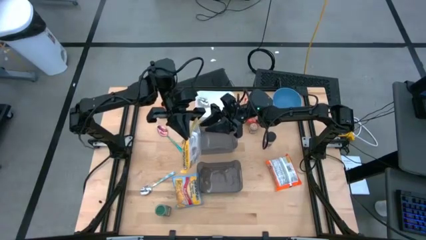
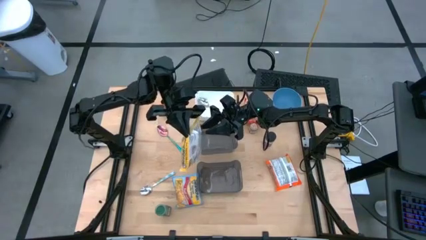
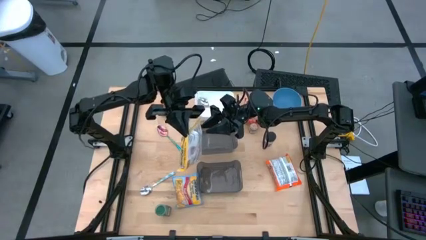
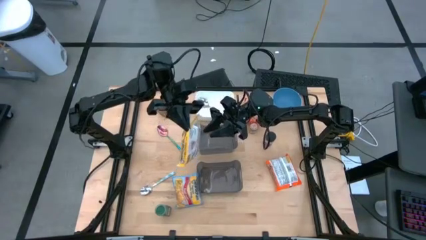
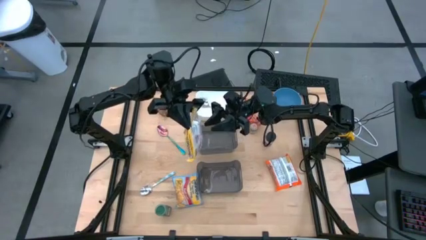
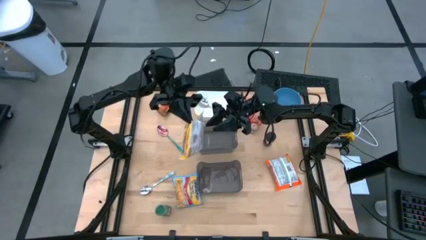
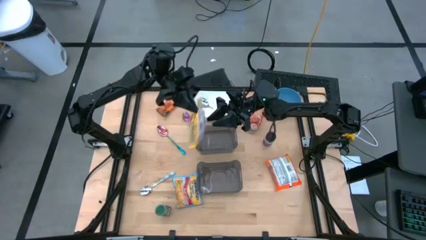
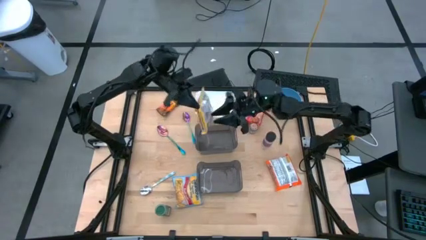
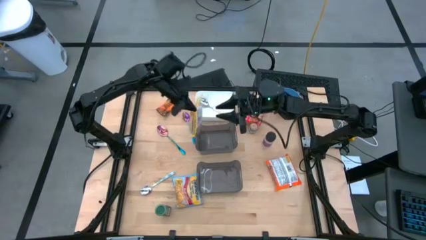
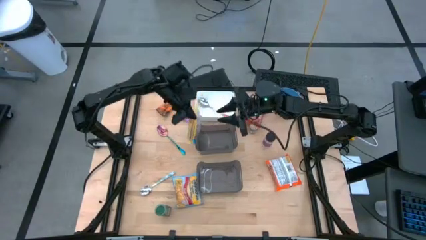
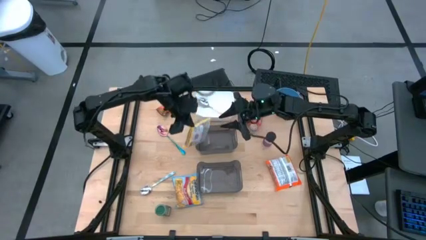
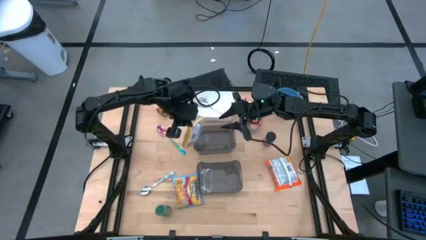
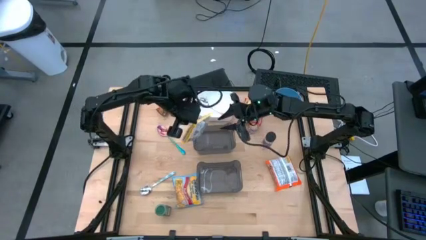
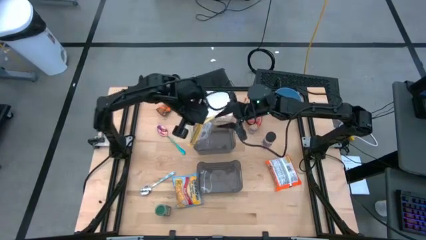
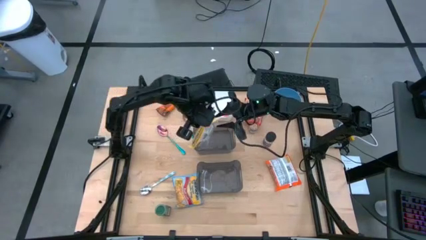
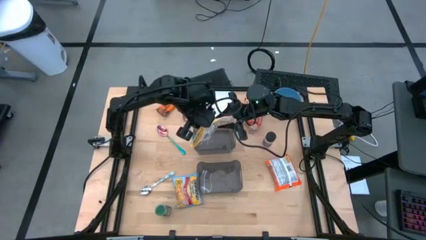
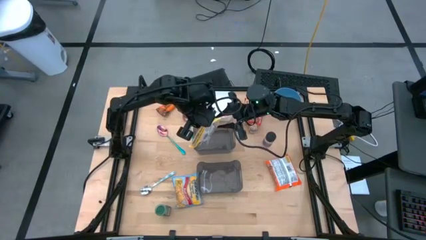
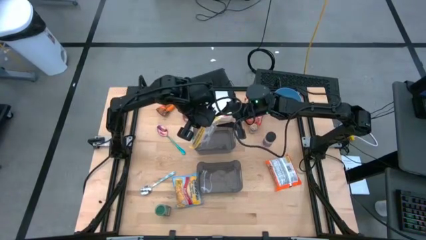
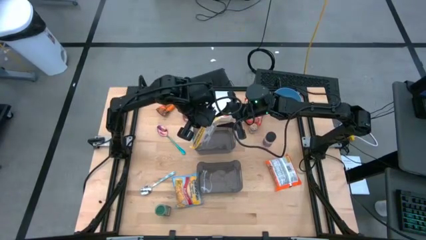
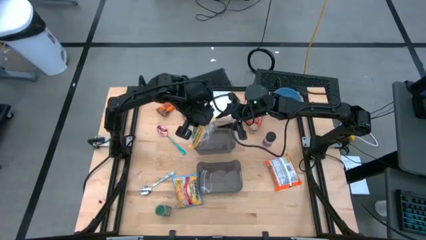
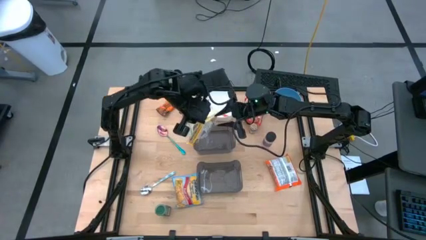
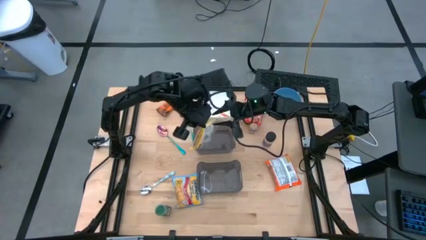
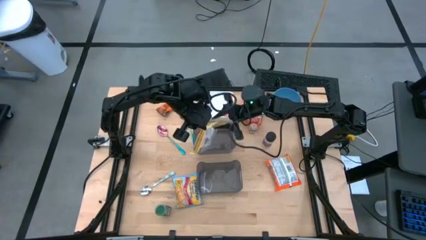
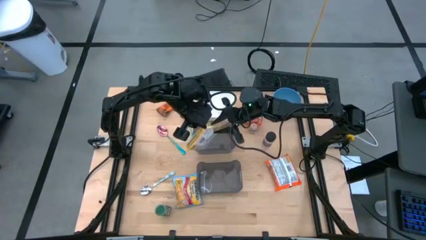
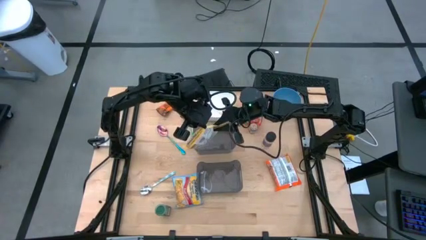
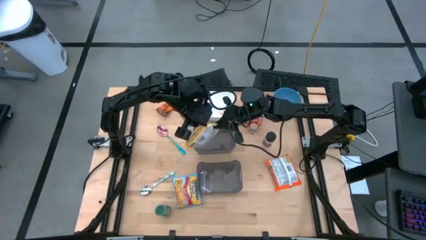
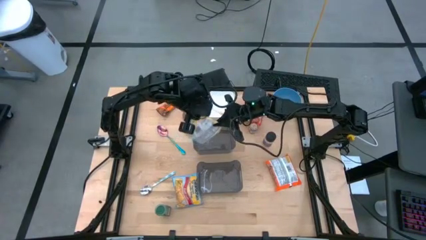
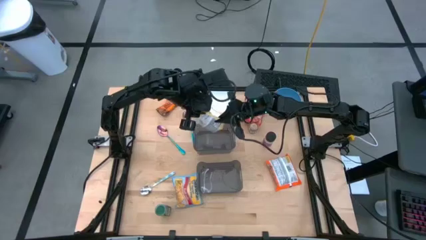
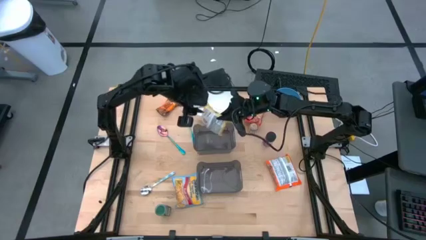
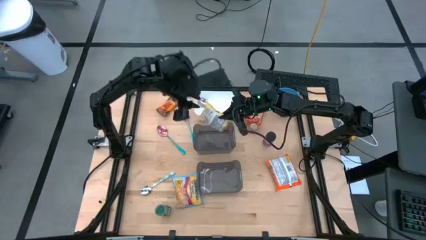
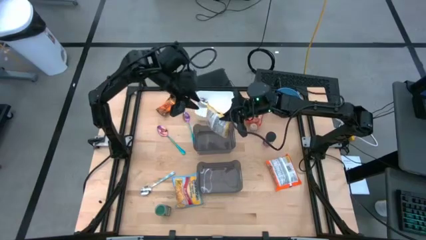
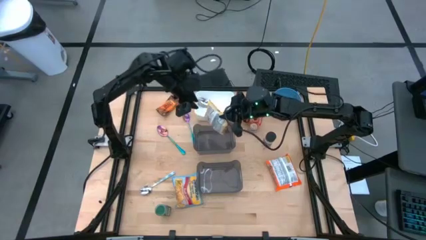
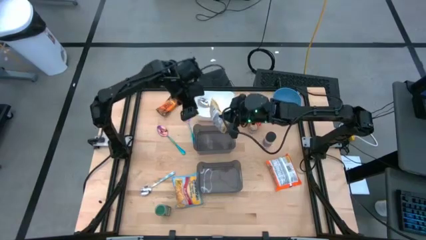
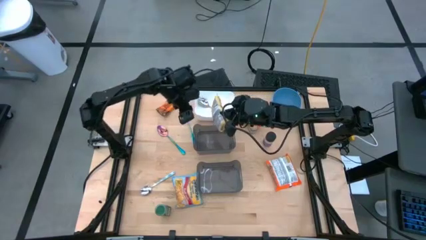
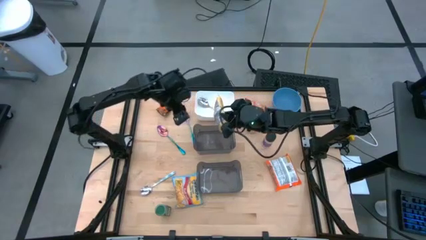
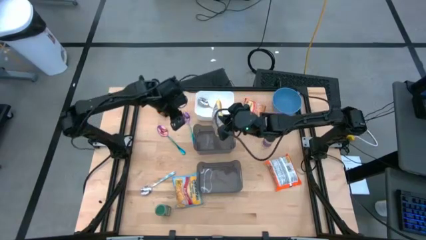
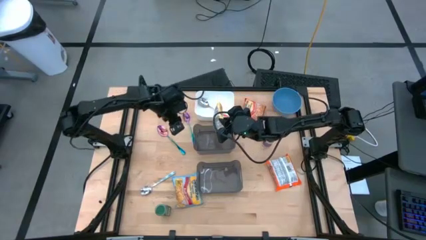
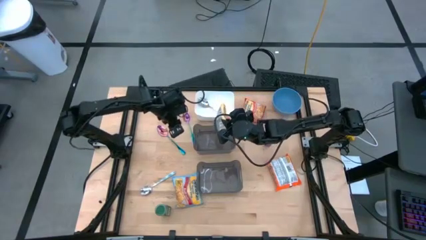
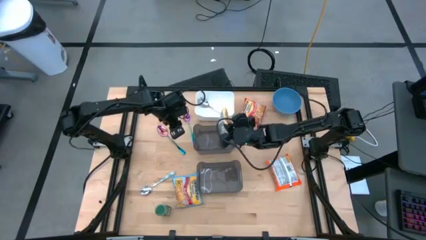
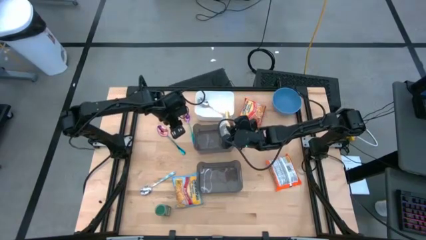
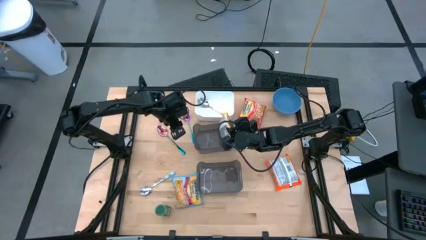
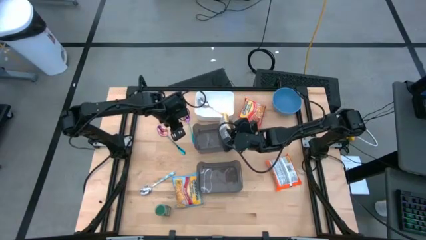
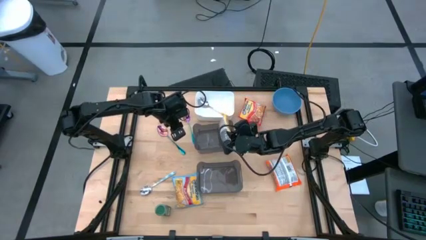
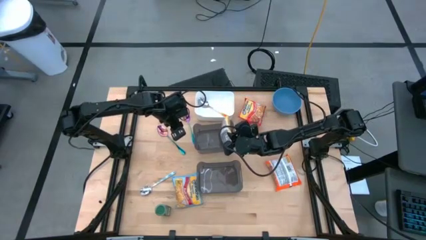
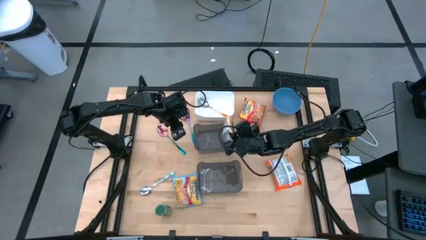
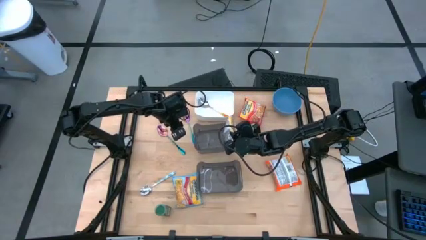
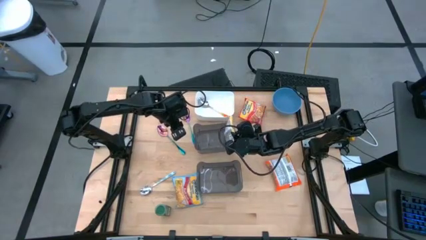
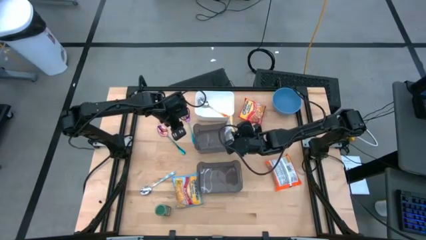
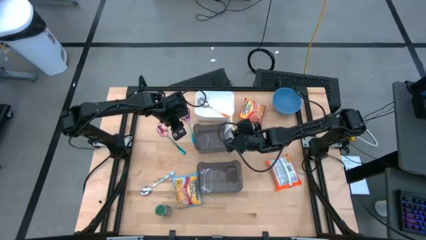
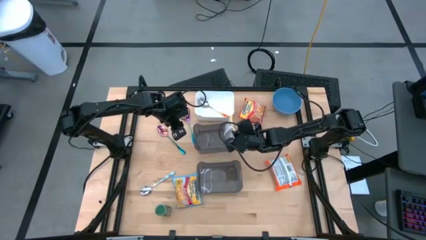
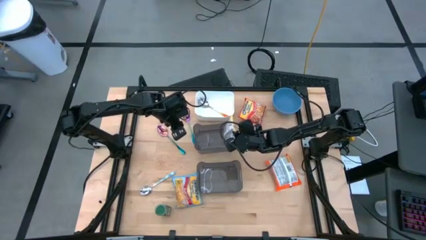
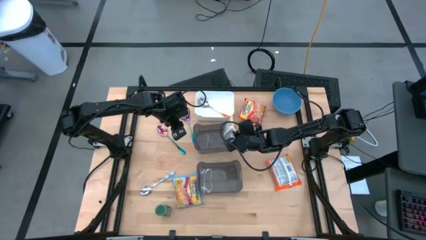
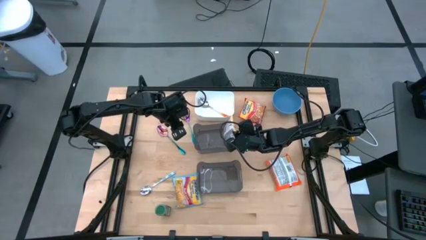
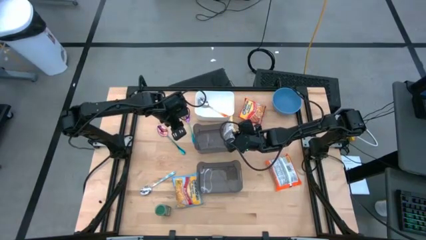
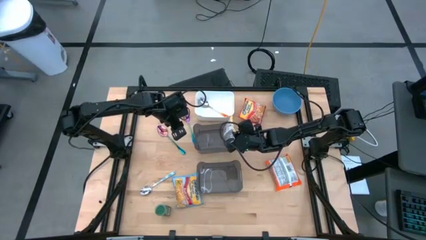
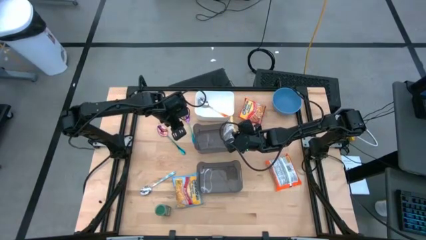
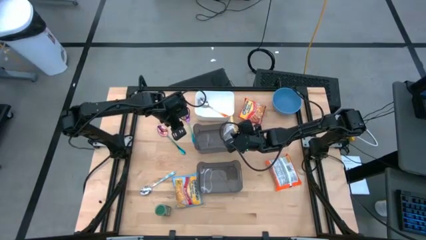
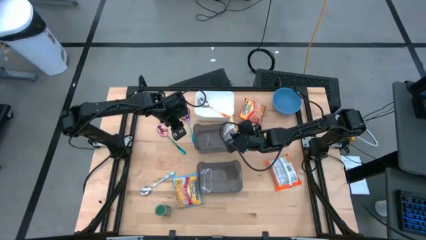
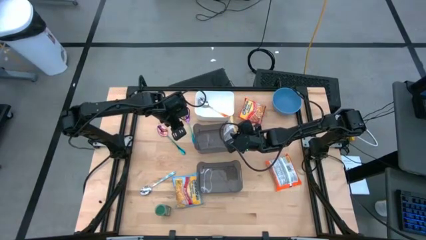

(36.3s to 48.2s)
Task: Pick & Place Food Item
Put the yellow noodle pack into the top black bin
